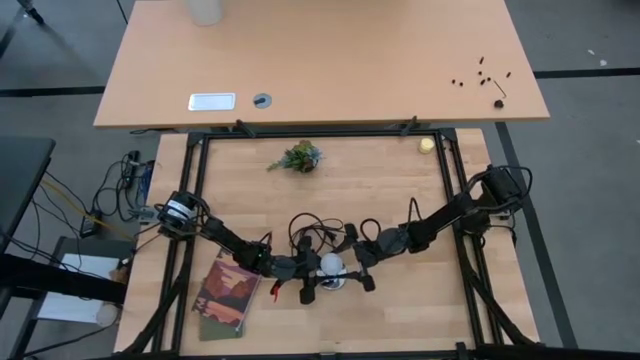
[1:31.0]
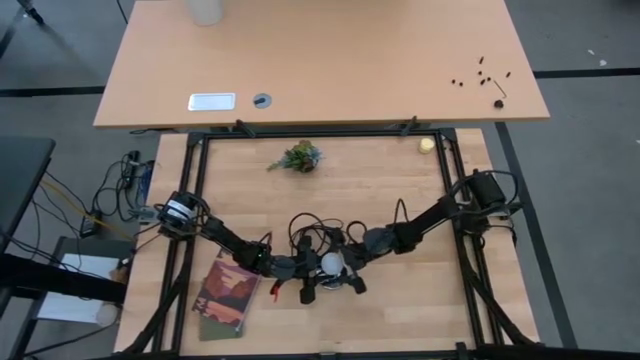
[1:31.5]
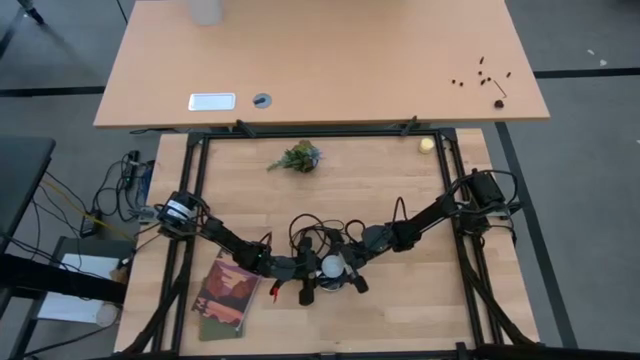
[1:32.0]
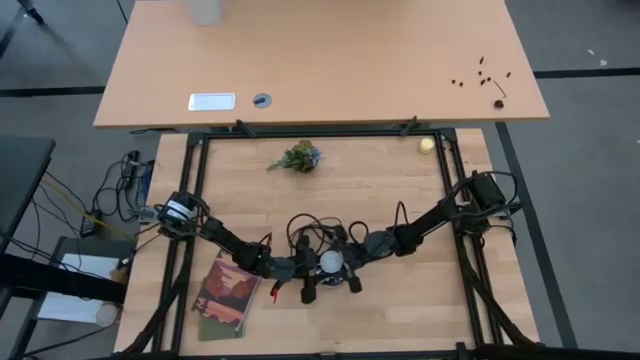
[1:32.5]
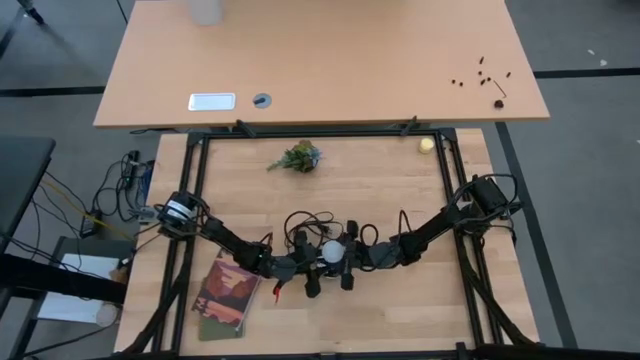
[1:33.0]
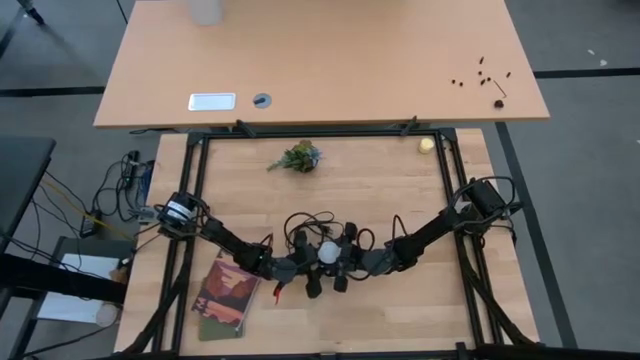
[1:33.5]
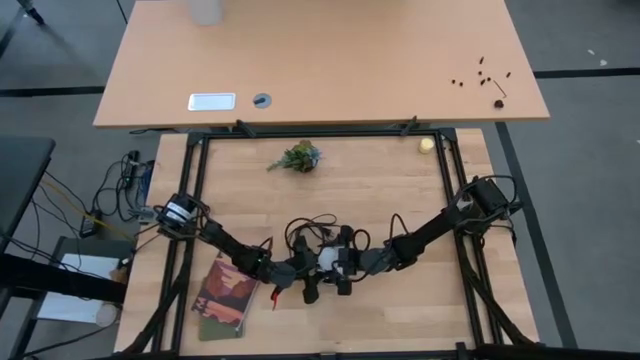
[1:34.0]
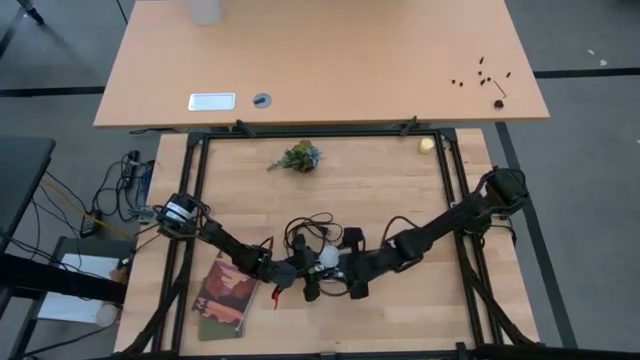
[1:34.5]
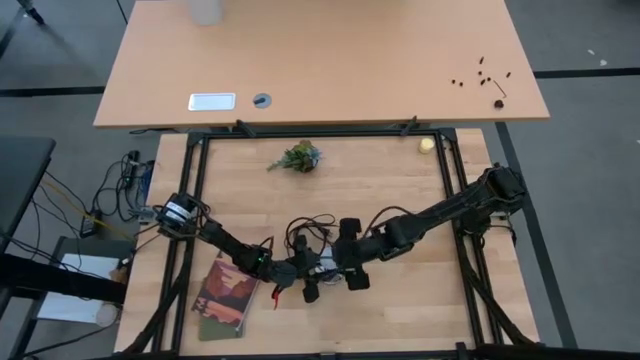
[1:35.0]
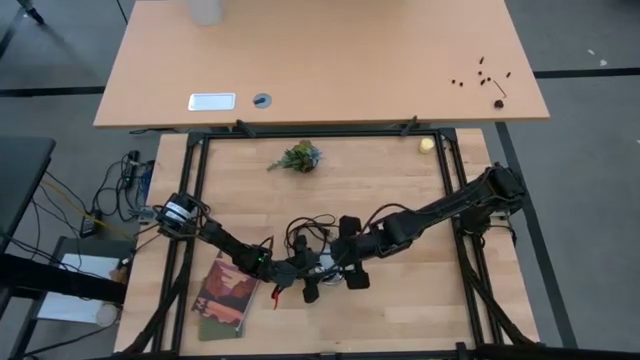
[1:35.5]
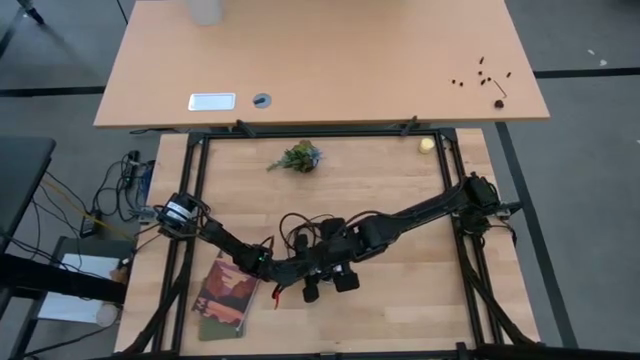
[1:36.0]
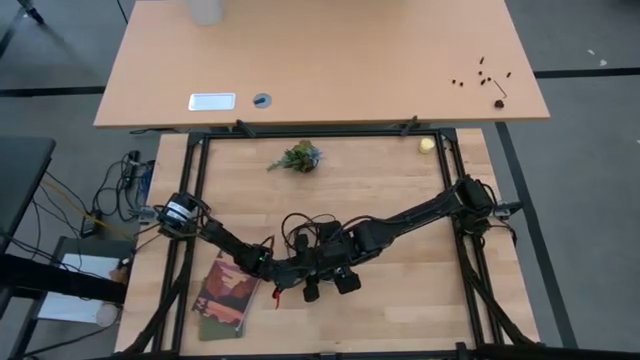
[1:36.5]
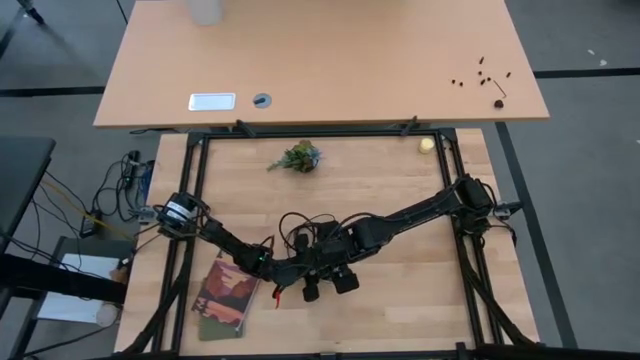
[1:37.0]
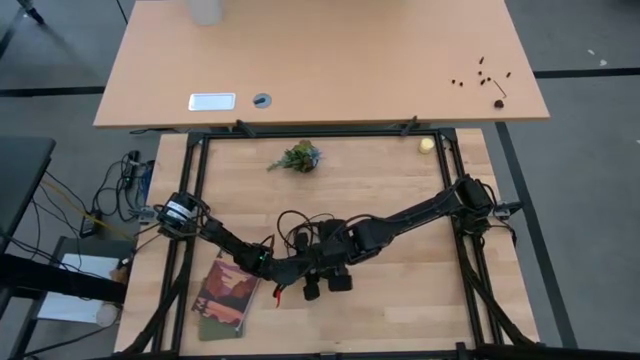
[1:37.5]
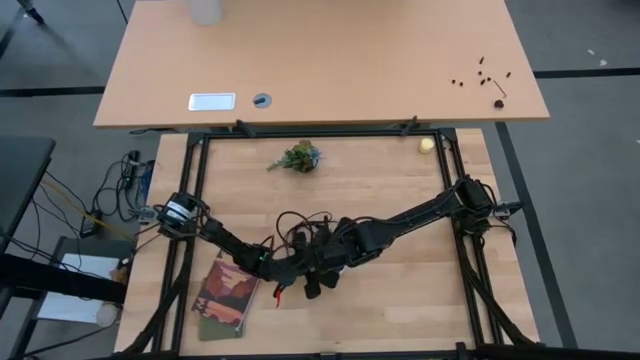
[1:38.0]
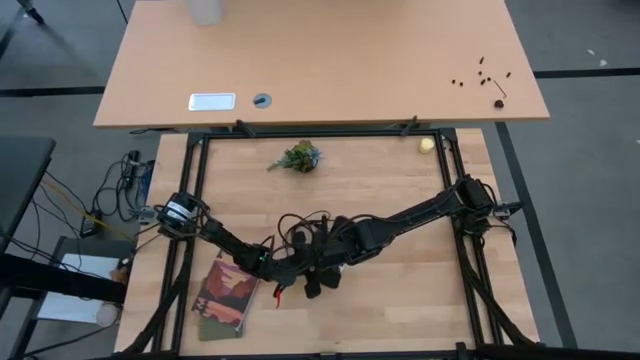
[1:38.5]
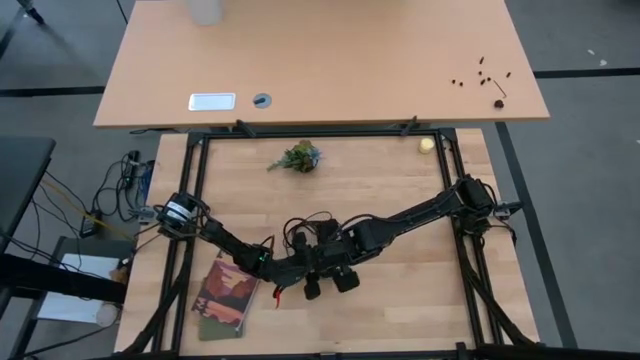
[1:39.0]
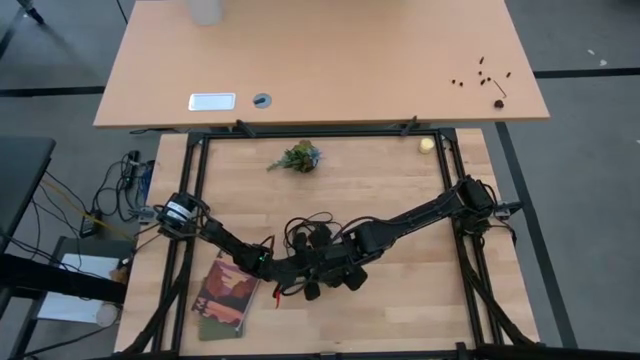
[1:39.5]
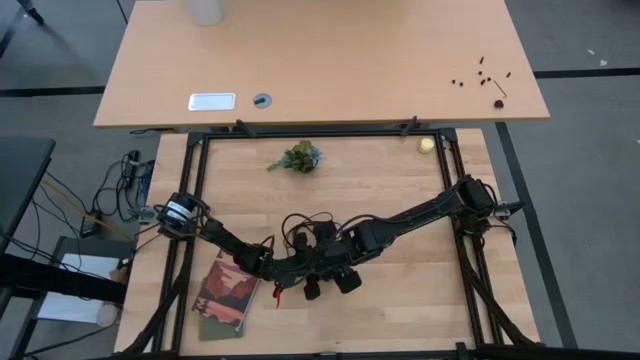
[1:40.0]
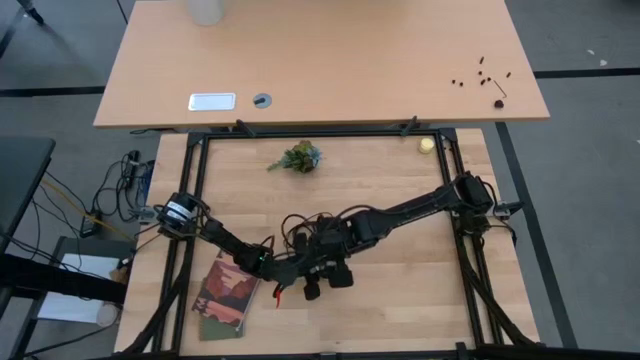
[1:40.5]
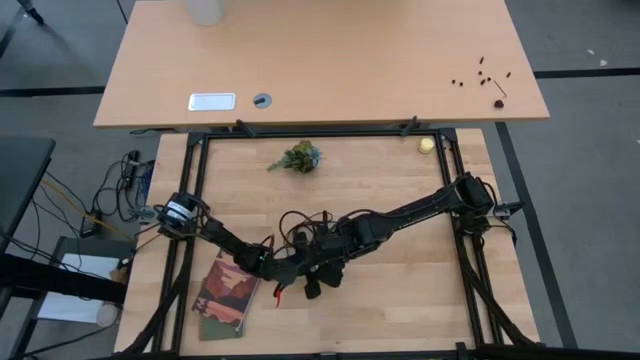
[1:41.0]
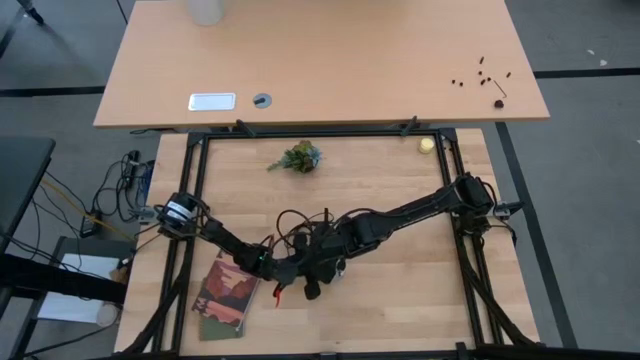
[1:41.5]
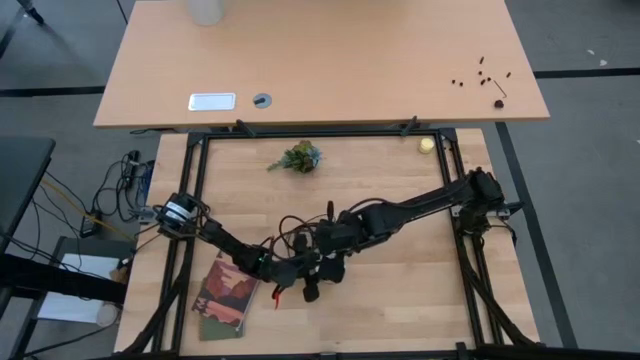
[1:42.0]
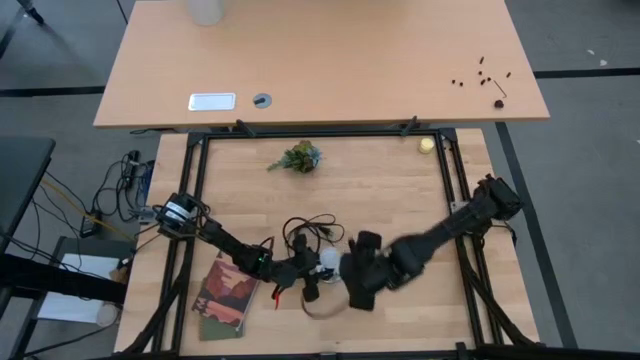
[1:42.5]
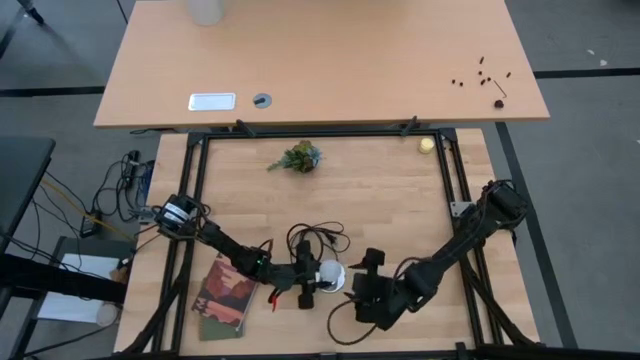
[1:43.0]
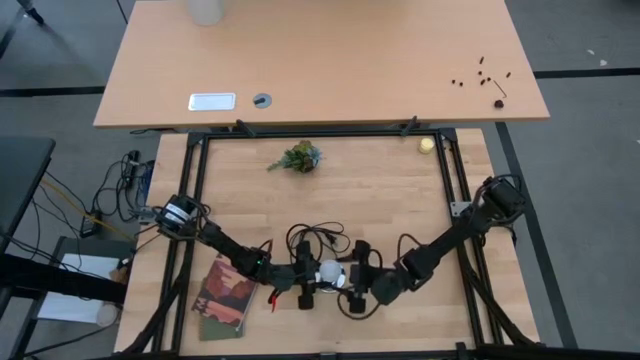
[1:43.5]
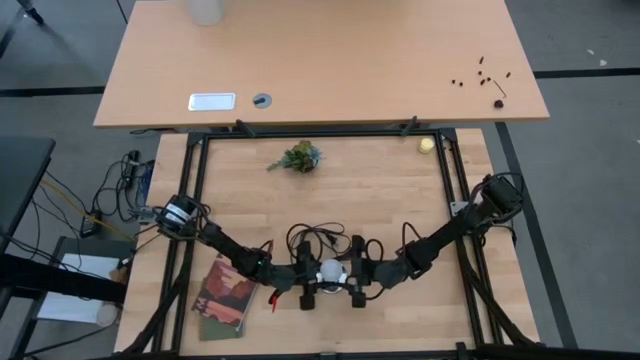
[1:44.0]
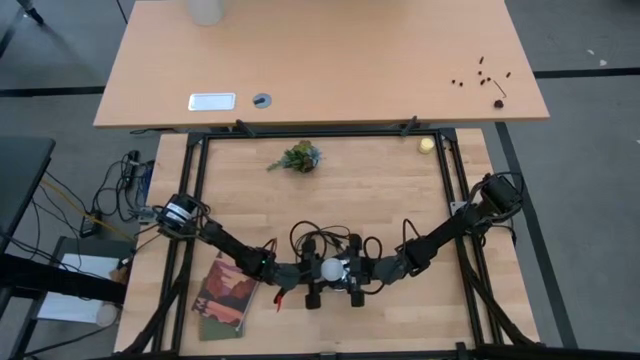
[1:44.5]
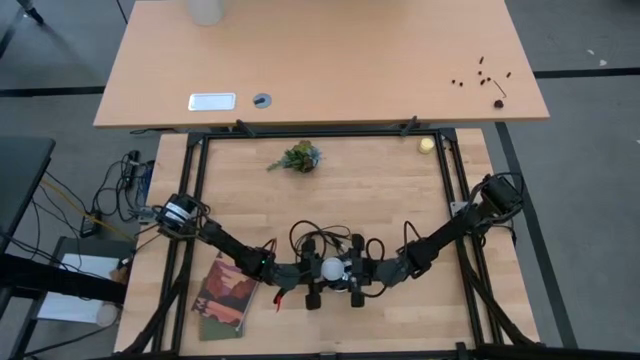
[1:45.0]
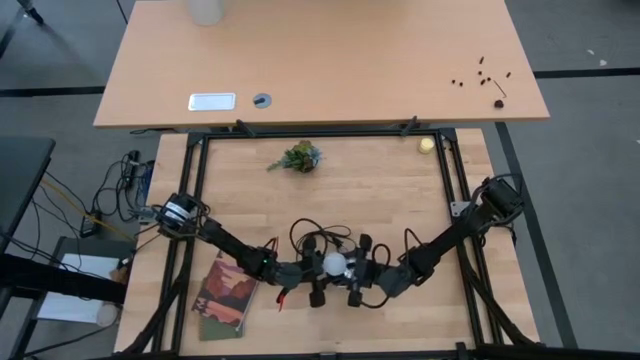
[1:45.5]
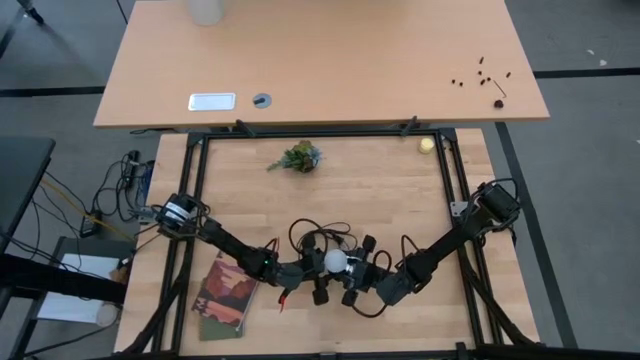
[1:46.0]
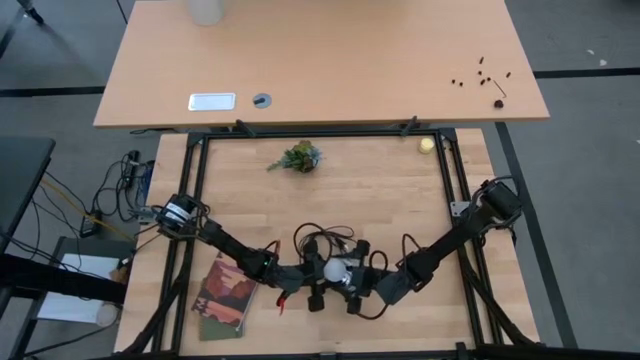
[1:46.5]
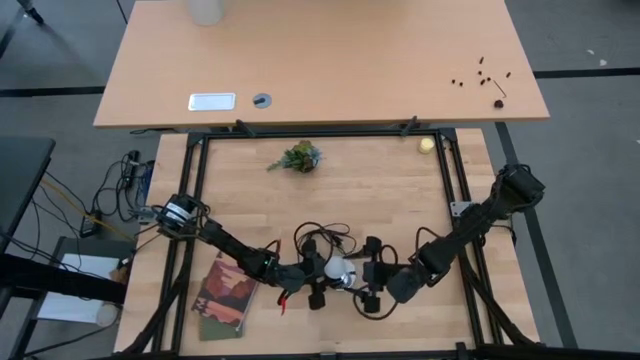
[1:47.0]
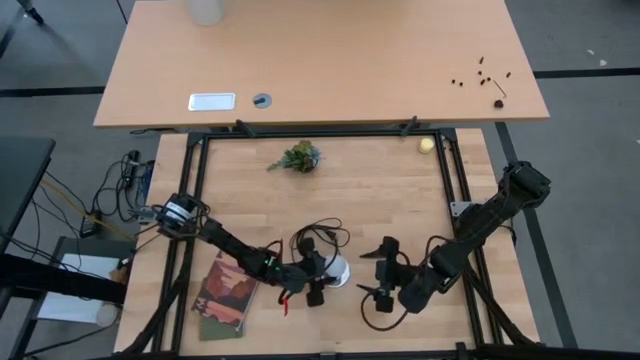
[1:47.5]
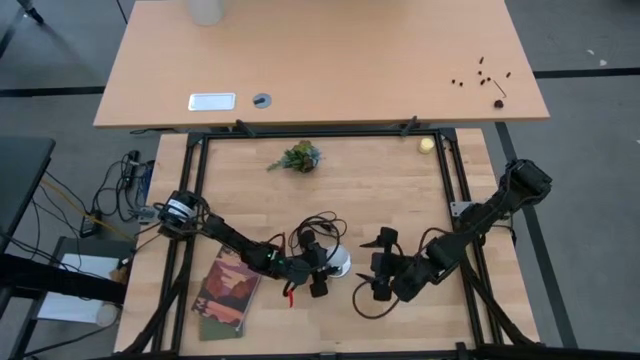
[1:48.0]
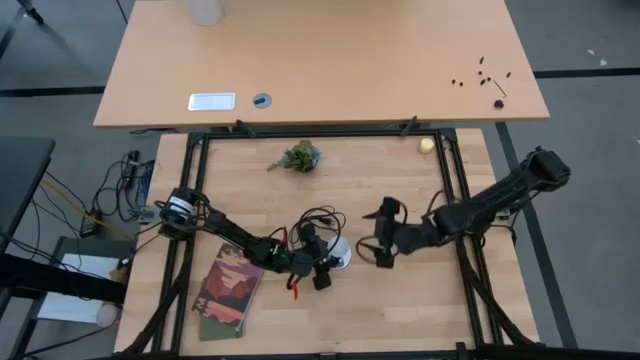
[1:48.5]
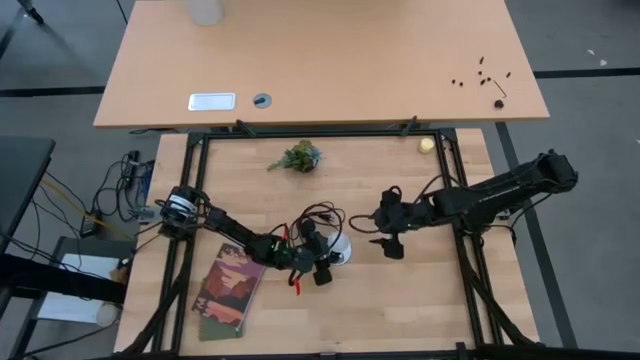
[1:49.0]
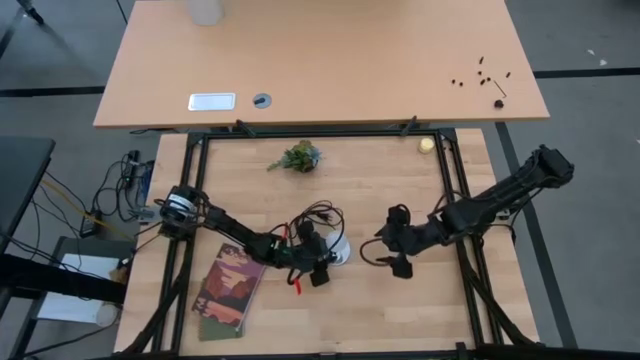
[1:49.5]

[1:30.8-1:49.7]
Task: Screw lightbulb
Insert the white lightbulb into the lamp socket
